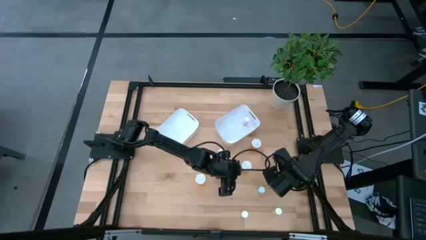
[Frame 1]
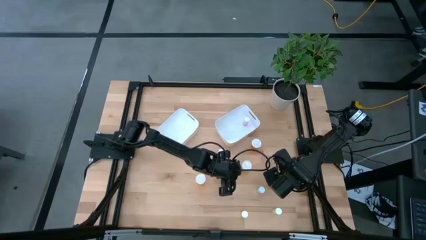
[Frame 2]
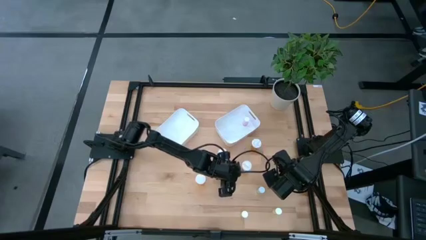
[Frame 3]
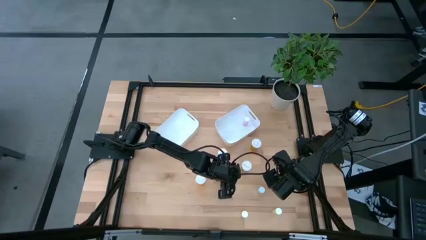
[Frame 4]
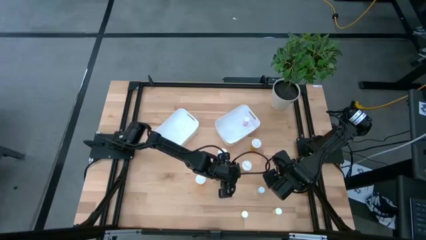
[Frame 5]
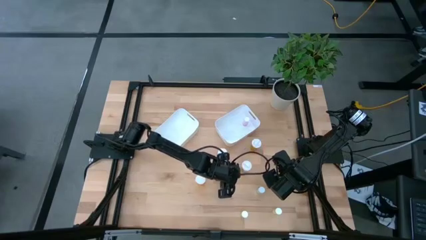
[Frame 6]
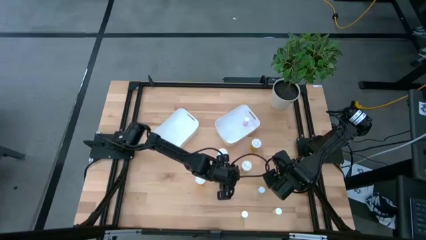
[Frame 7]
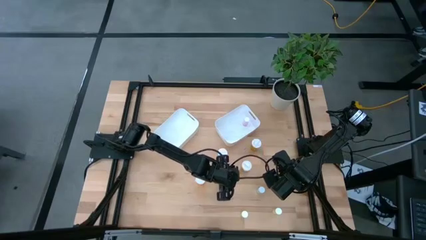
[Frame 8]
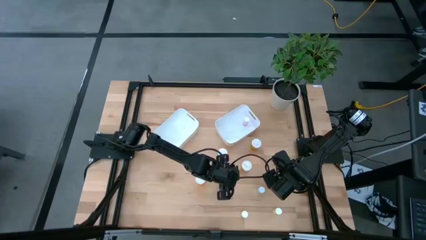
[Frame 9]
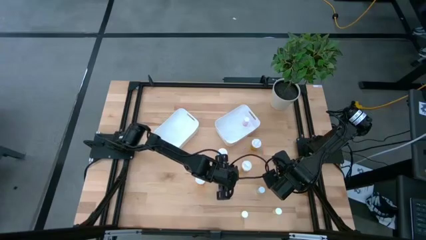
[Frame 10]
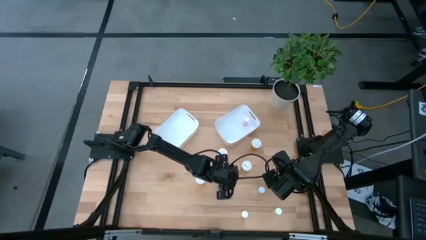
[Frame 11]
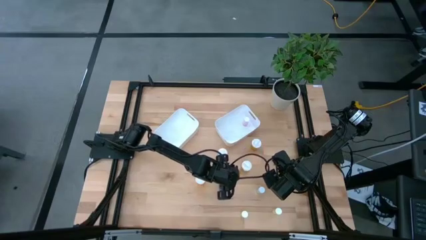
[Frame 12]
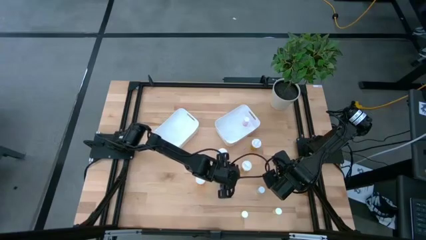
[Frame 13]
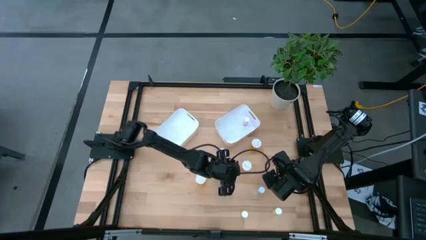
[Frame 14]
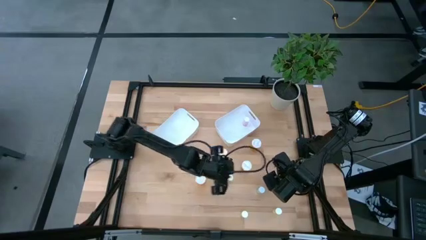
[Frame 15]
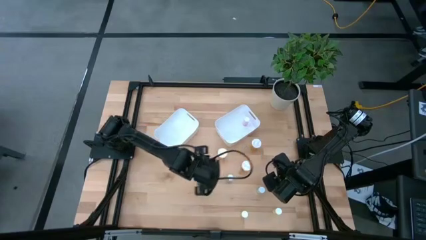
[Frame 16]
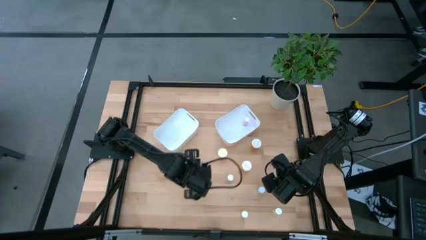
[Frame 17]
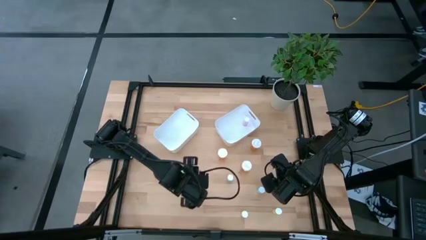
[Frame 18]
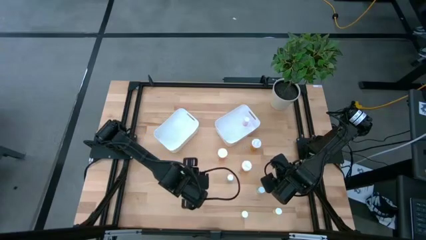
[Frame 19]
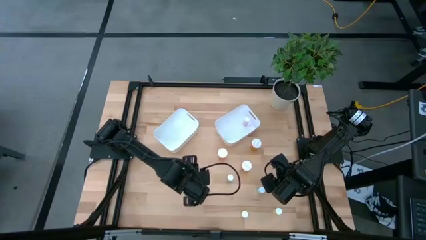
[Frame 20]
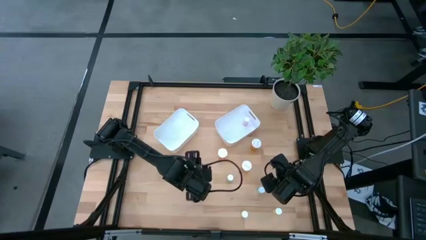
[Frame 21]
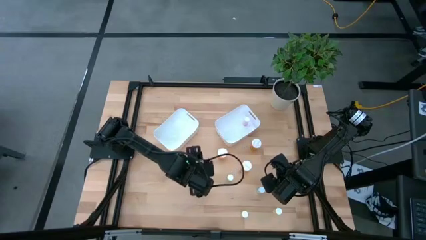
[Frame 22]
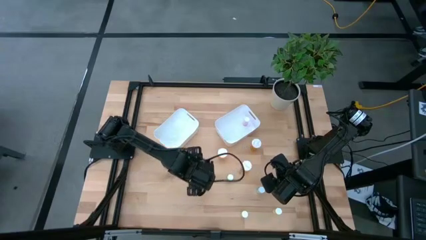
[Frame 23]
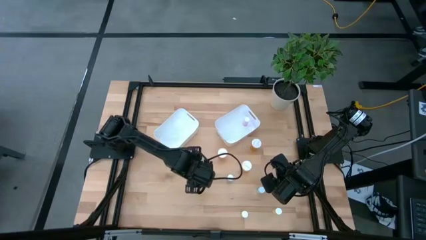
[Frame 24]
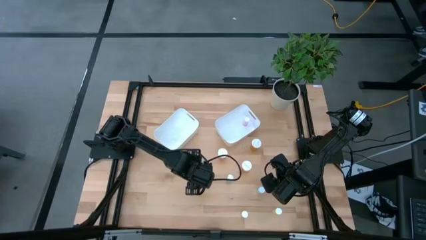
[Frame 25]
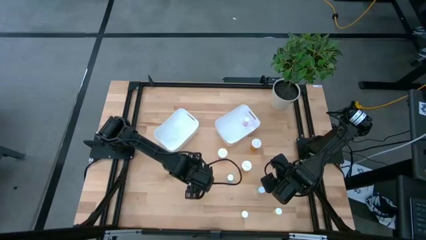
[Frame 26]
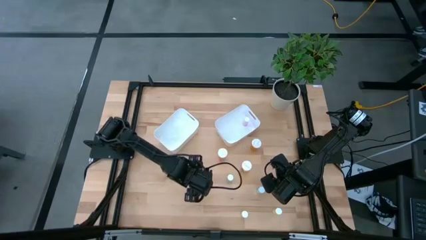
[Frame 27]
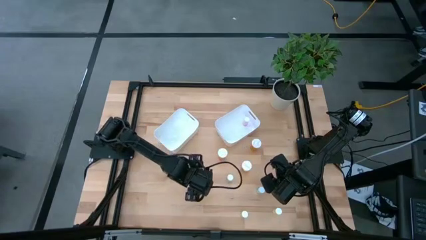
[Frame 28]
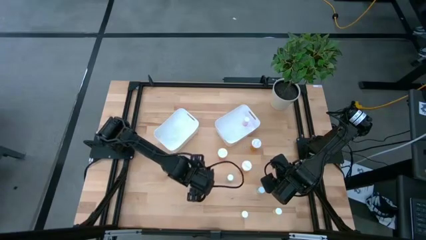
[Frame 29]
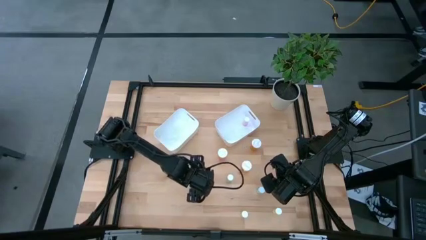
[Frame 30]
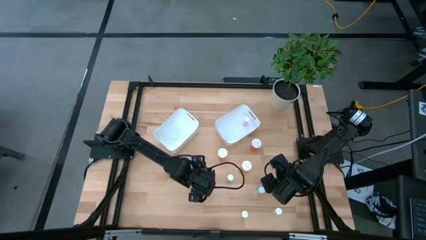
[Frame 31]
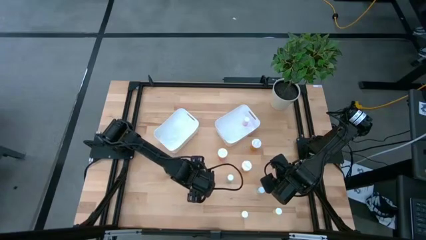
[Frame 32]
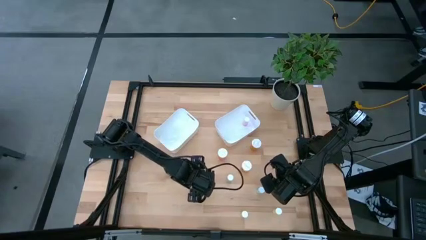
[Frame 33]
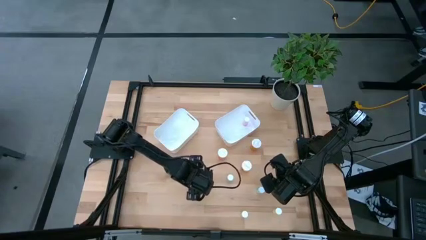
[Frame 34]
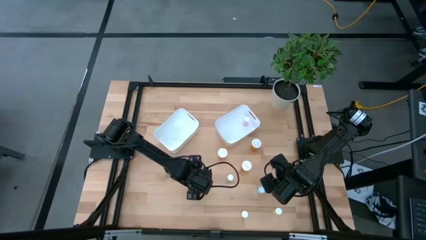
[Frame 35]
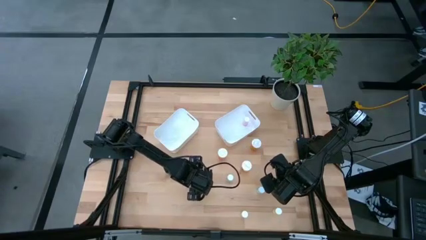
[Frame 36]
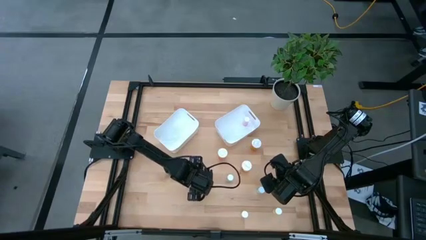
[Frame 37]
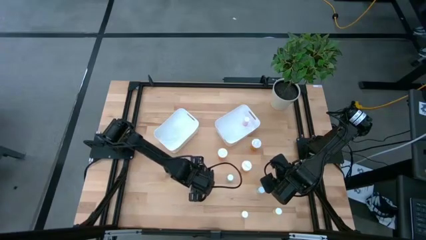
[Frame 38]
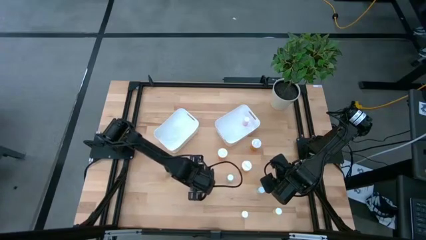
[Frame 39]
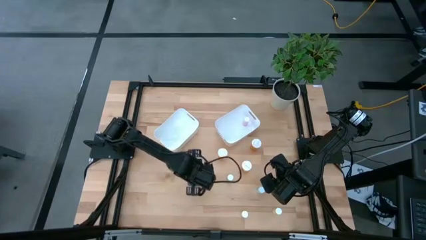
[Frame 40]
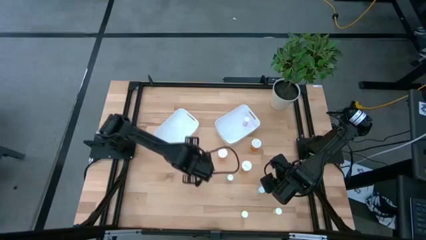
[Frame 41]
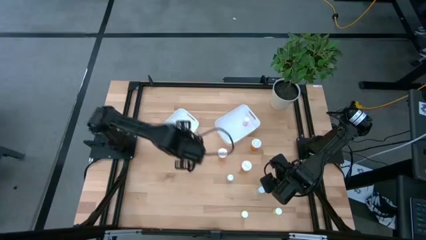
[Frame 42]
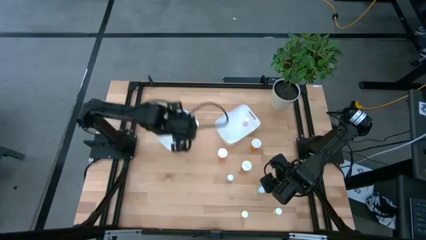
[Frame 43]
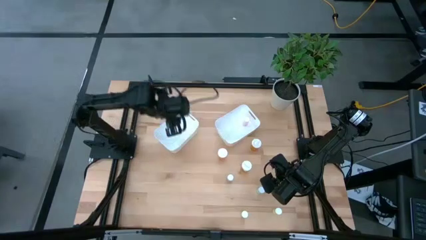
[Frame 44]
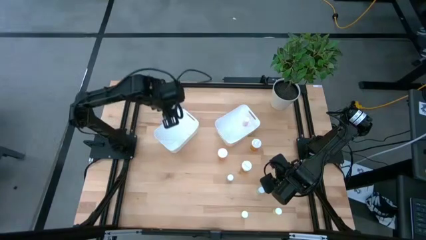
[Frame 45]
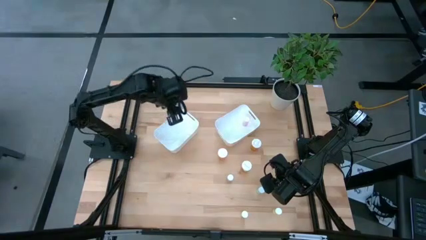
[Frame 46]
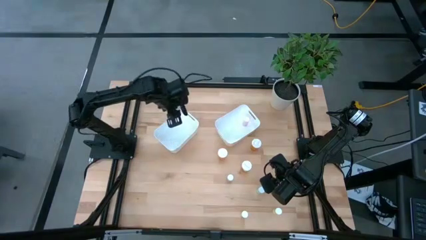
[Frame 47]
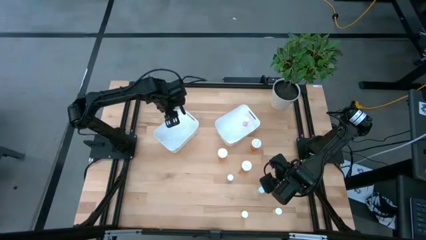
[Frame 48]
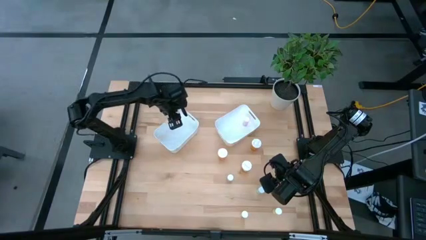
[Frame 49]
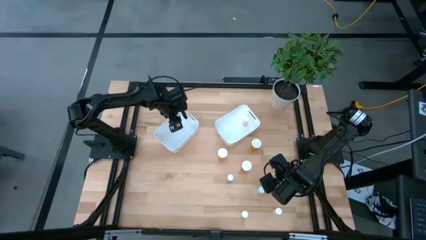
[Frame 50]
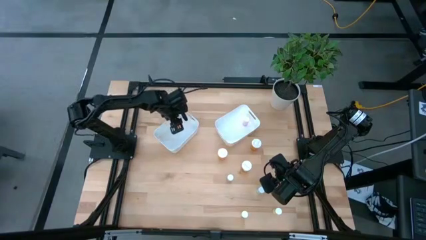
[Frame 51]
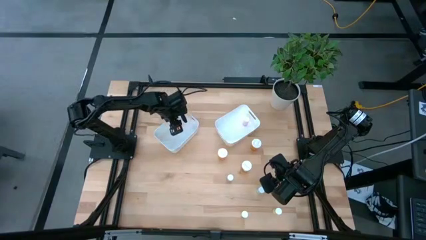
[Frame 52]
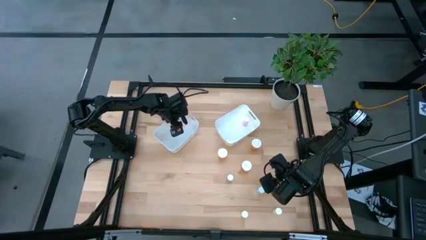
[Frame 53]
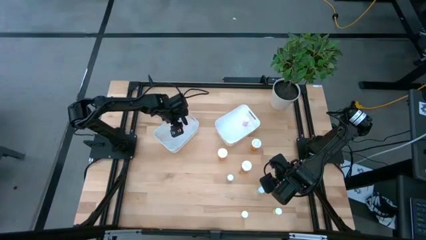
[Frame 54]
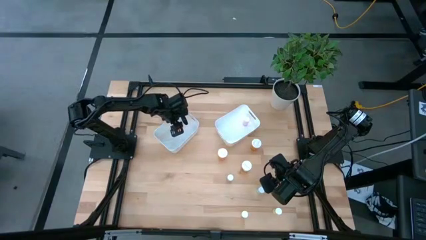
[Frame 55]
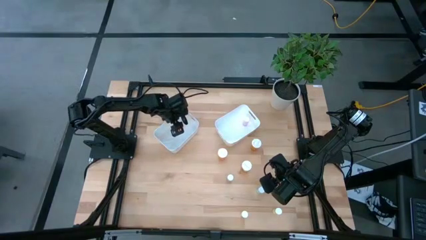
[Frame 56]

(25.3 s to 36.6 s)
Task: Pick and place medicine bottles into bin by pill shape (circle, oval)
Put the orange capsule bottle into the left white bin
